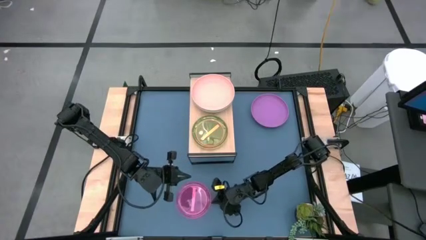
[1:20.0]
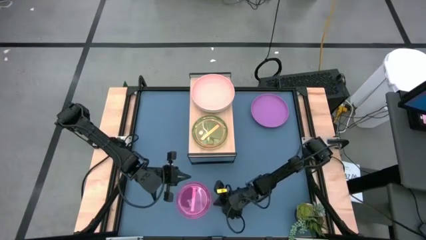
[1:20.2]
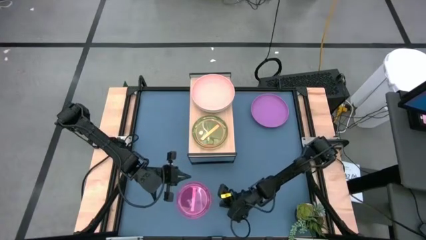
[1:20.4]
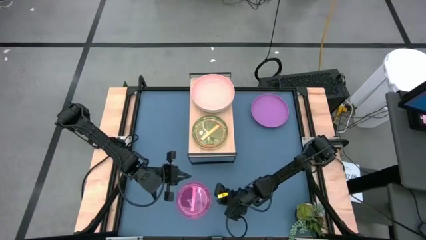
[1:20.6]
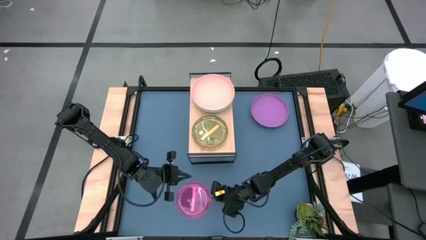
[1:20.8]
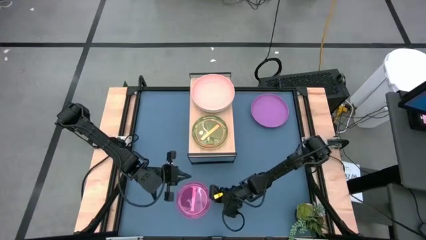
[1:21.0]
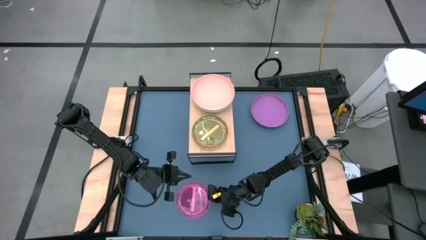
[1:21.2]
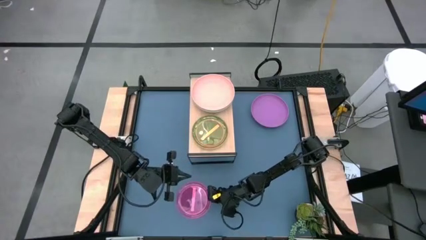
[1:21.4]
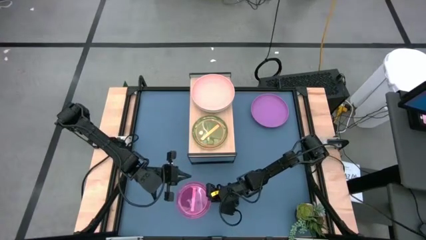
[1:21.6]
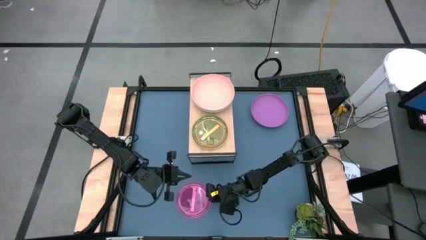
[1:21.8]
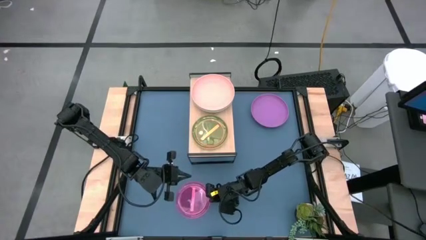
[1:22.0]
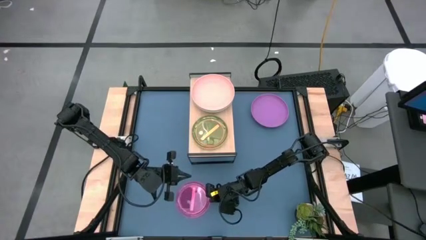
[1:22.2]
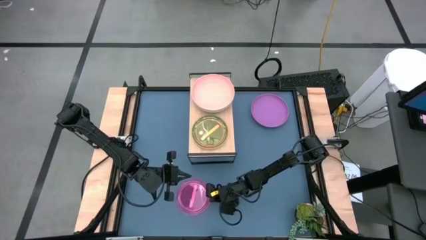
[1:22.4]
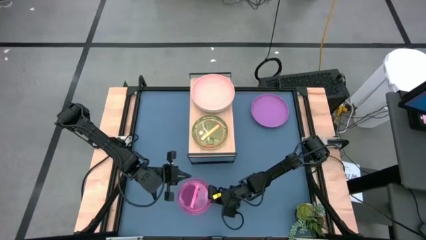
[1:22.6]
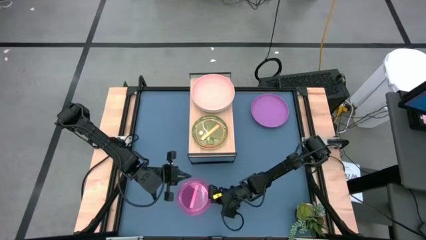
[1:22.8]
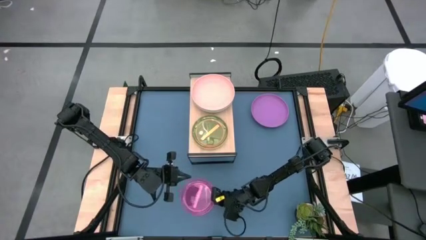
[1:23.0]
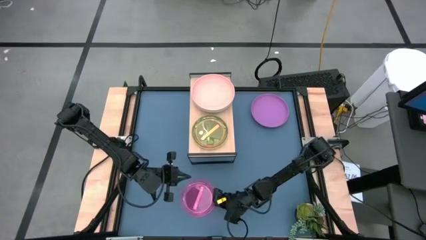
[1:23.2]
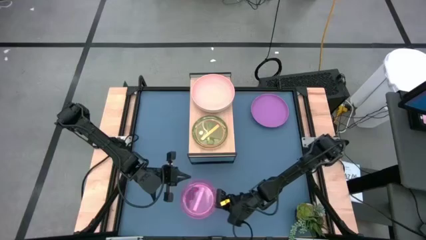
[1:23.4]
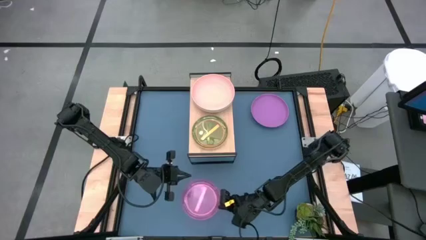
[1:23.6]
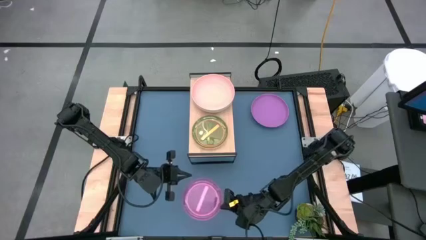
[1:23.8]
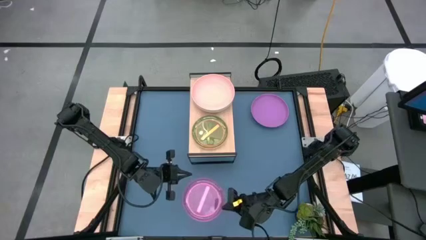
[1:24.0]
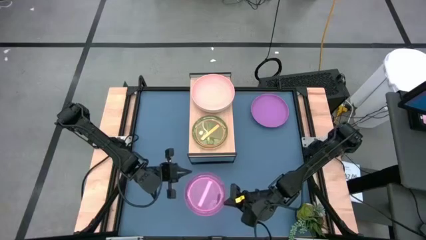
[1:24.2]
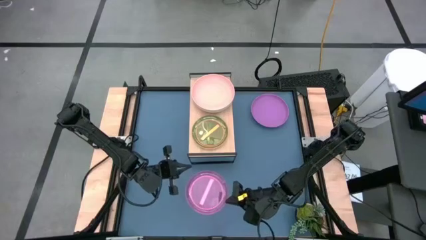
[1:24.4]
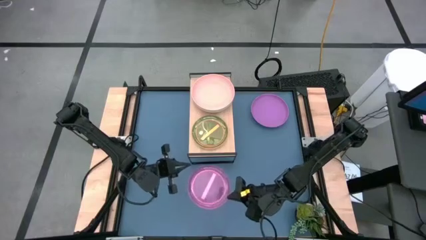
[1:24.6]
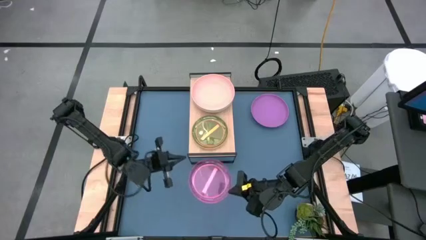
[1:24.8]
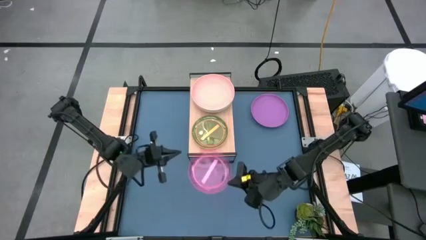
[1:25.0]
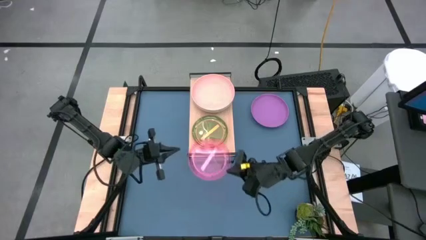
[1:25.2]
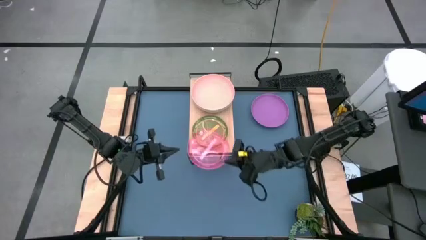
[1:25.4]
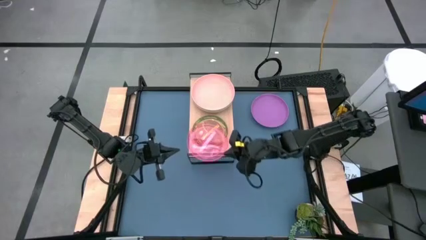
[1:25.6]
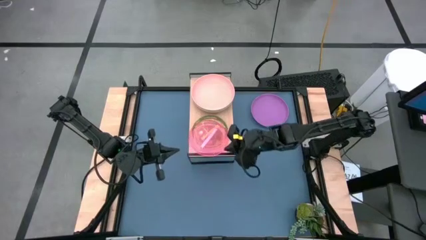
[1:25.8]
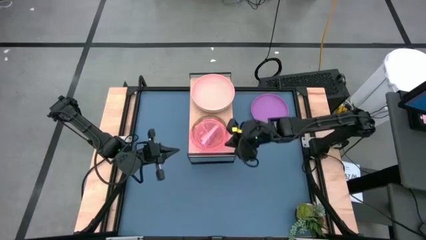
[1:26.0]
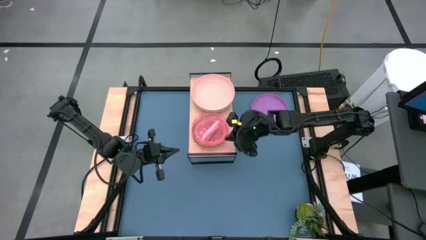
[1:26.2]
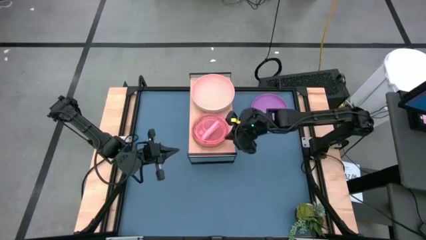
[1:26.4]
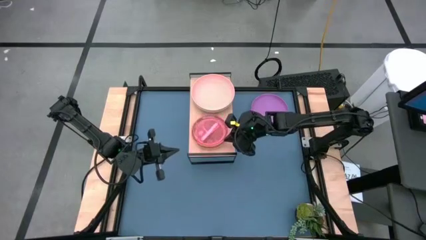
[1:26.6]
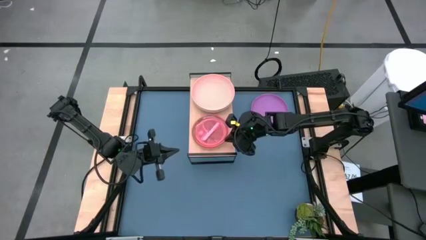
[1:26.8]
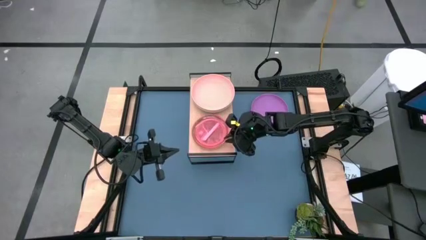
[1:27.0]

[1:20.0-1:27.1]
Task: Place and stack plates onto a shelf
Stack the light pink plate on top of the orange plate on the shelf

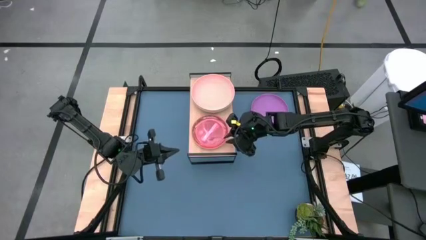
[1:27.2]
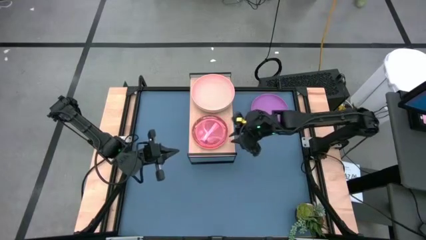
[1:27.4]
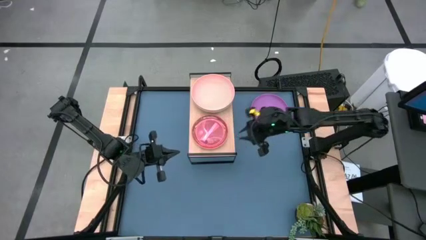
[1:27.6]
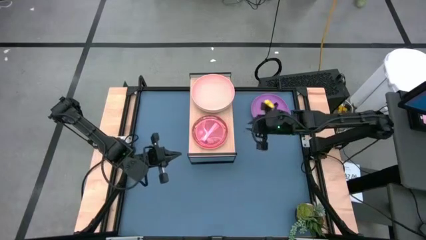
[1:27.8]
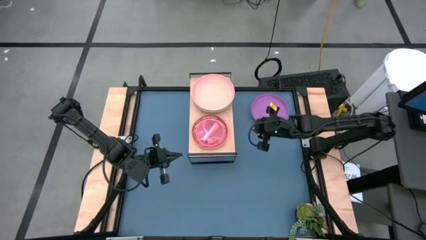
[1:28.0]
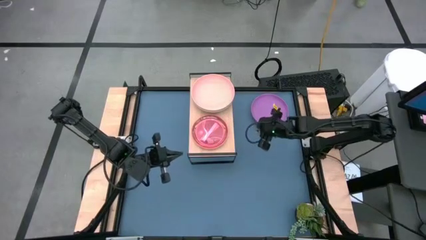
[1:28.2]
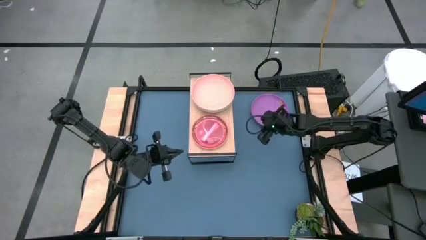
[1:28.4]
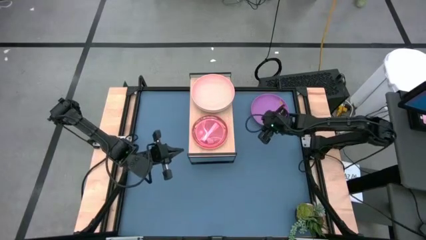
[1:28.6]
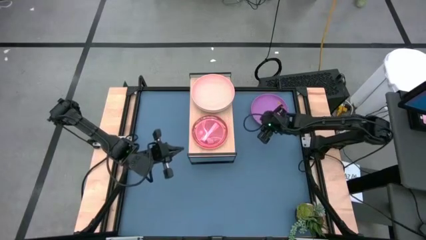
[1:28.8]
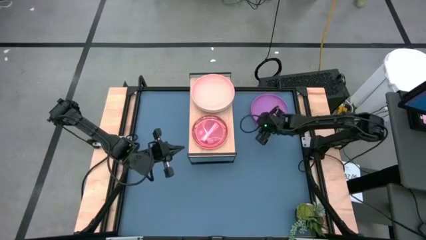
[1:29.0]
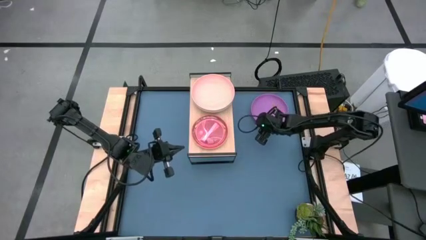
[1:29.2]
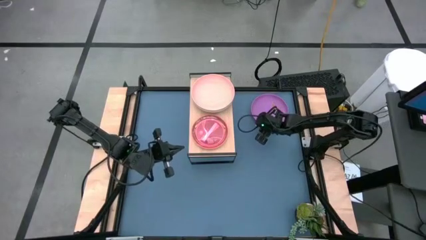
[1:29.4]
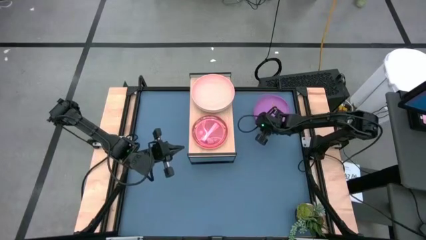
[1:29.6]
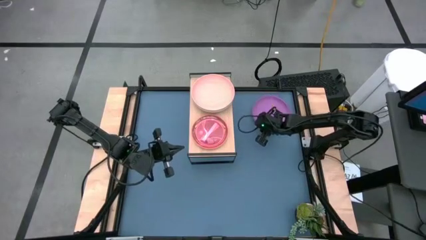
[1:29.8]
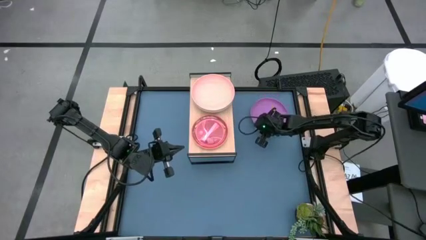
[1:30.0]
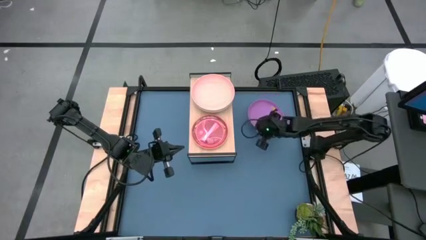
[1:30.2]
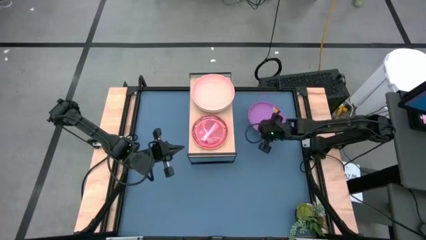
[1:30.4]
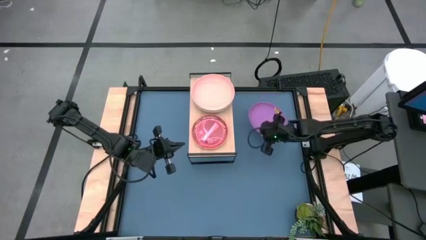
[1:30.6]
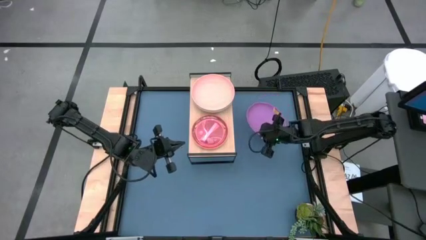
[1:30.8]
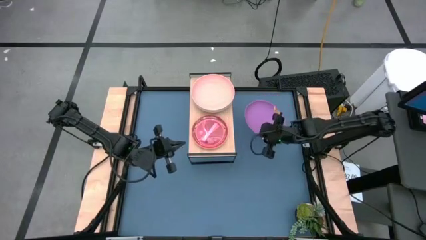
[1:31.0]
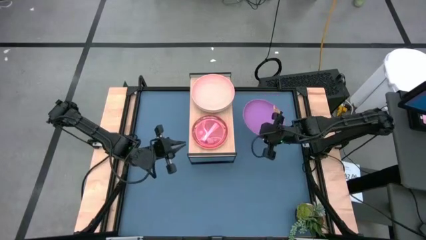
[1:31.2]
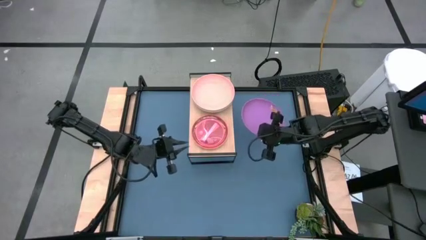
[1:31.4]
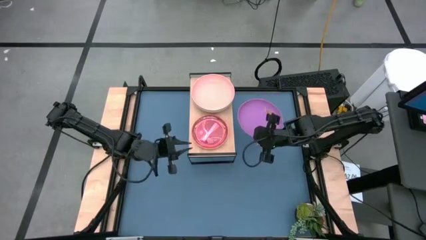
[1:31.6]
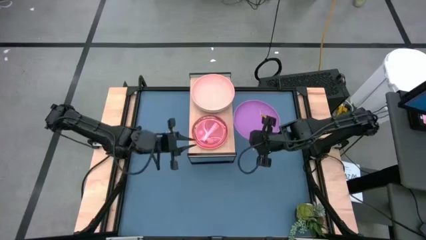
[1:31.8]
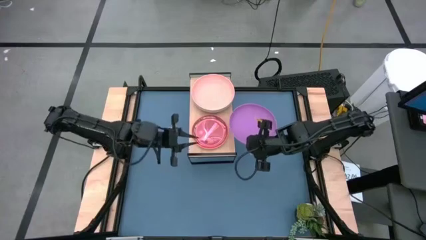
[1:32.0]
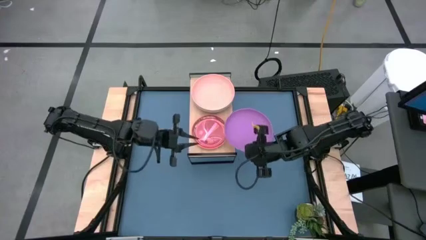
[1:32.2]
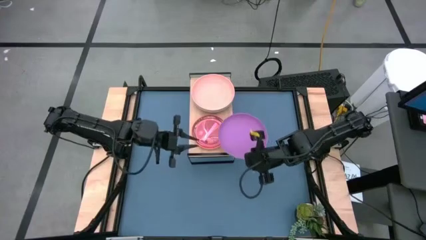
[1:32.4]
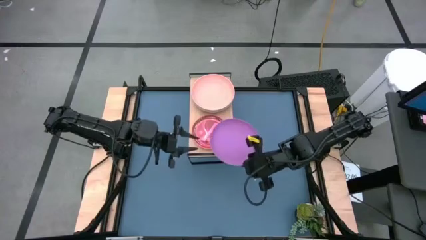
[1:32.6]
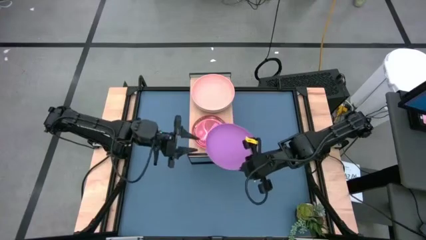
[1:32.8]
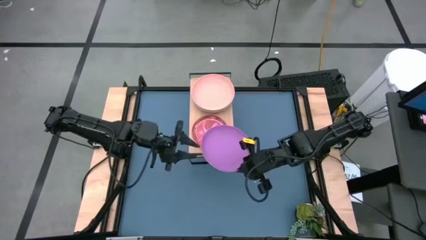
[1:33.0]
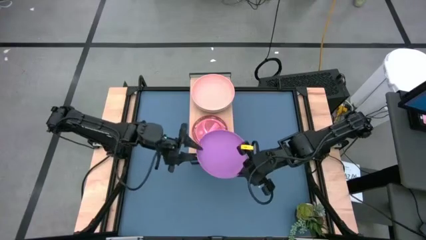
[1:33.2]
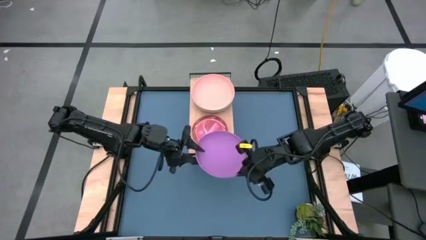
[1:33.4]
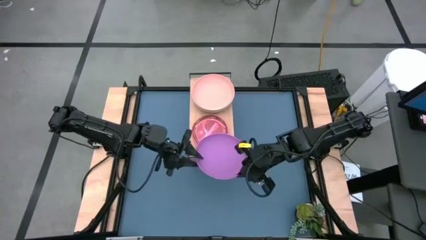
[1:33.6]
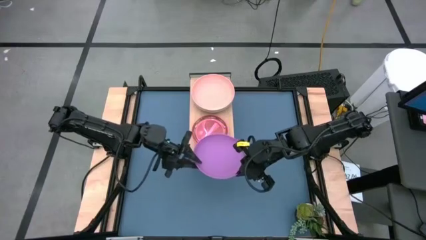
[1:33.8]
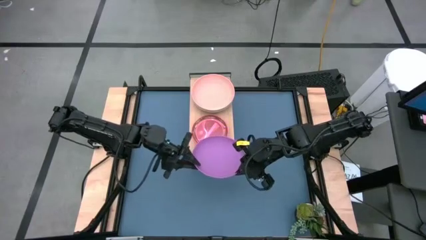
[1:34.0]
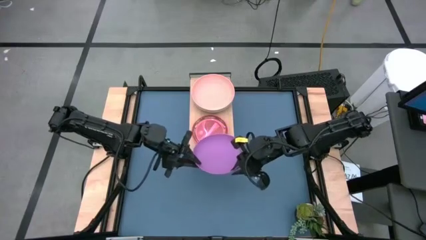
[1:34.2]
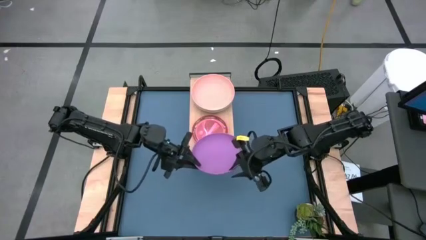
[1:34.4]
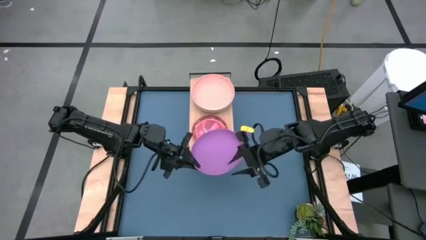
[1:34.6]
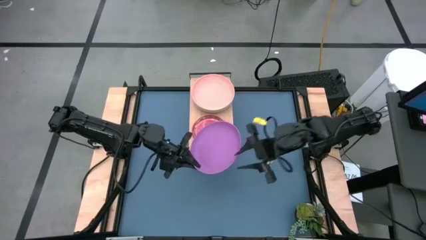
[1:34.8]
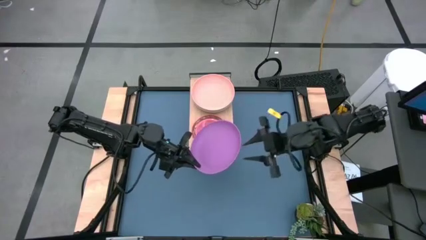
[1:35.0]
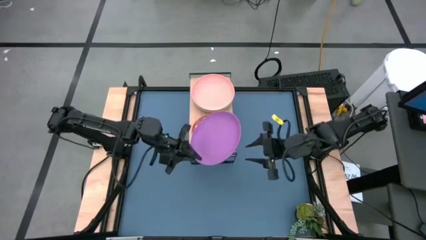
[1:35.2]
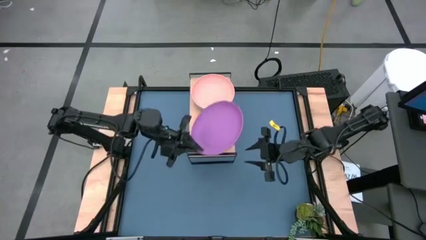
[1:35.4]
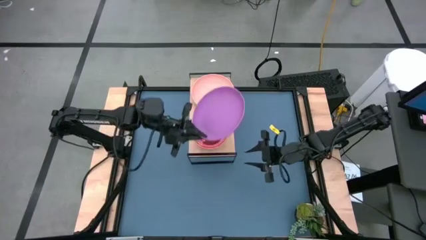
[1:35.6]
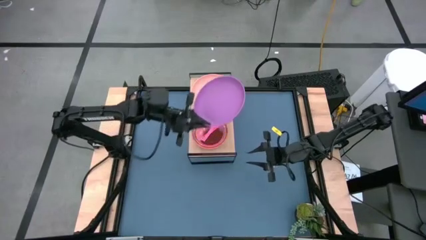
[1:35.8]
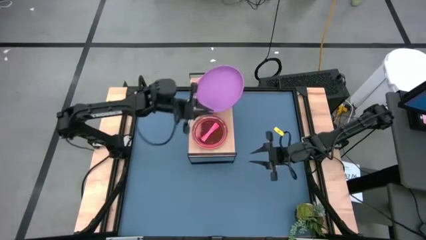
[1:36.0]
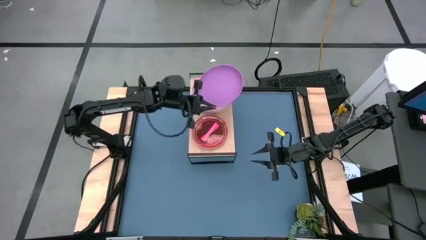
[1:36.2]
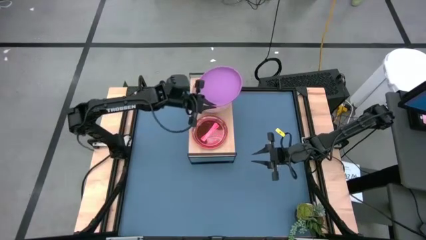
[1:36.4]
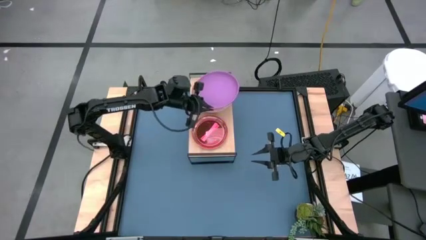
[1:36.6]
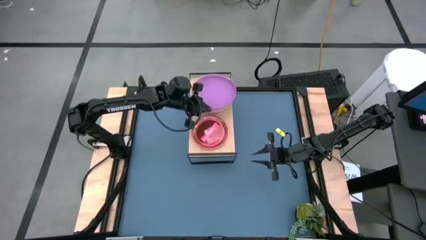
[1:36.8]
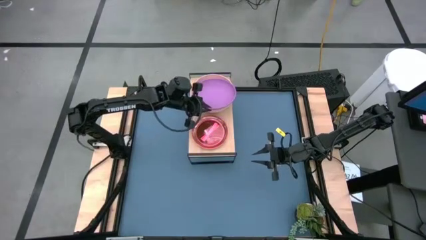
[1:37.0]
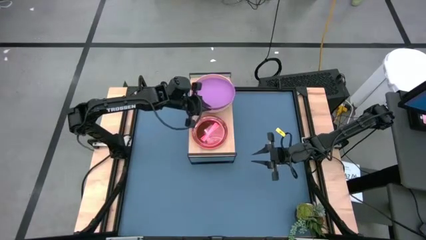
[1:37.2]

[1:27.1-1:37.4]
Stack the purple plate on top of the pink plate on the shelf
